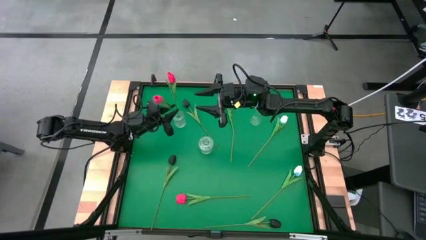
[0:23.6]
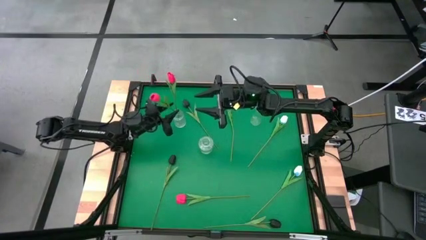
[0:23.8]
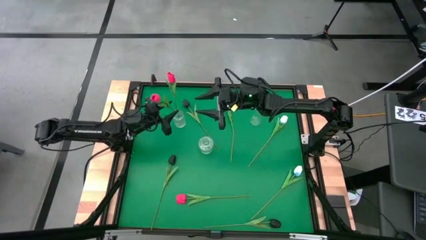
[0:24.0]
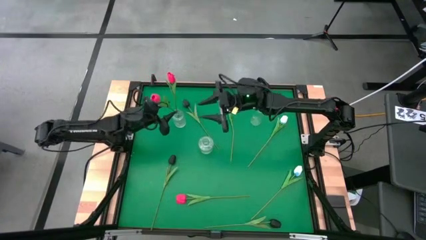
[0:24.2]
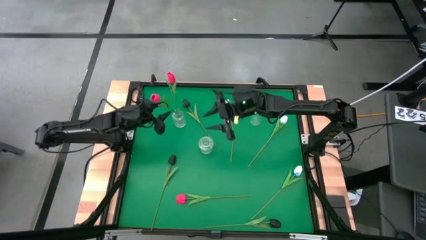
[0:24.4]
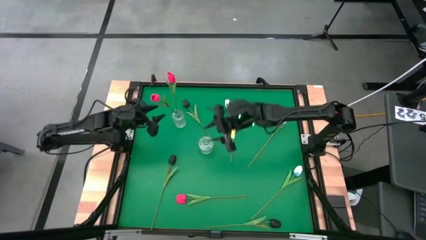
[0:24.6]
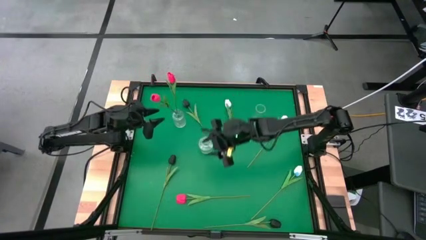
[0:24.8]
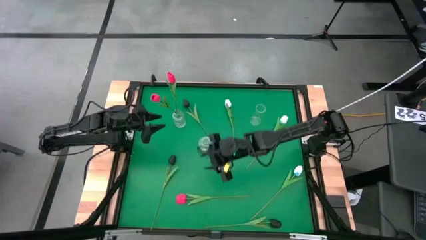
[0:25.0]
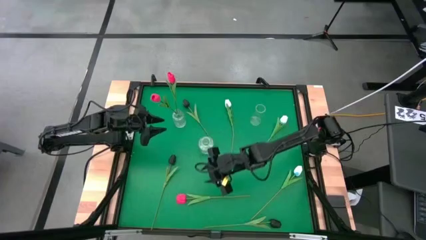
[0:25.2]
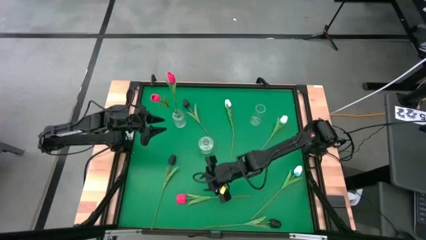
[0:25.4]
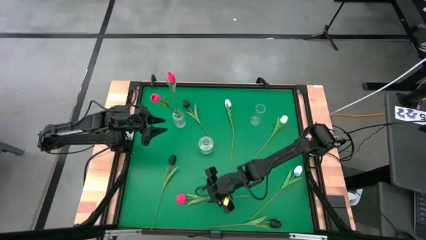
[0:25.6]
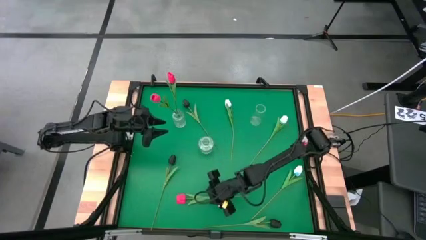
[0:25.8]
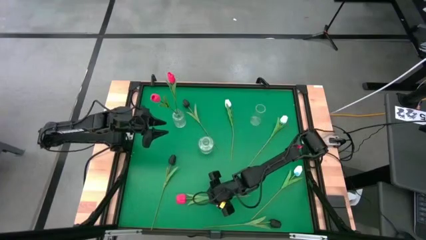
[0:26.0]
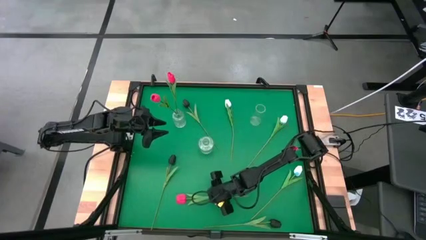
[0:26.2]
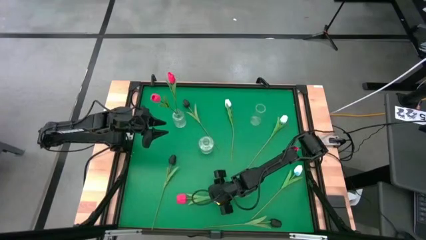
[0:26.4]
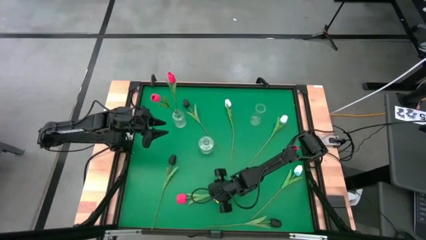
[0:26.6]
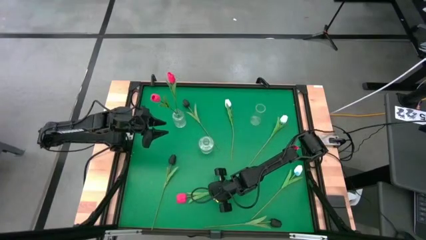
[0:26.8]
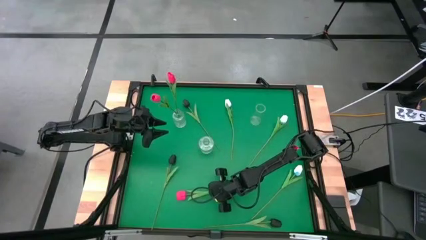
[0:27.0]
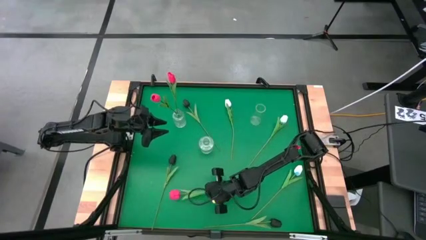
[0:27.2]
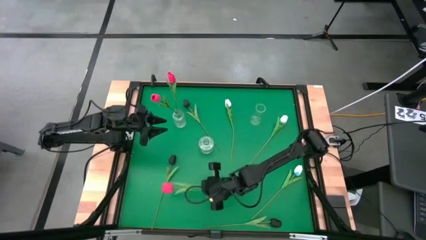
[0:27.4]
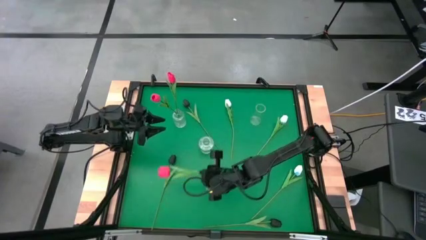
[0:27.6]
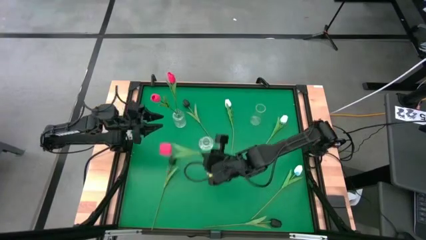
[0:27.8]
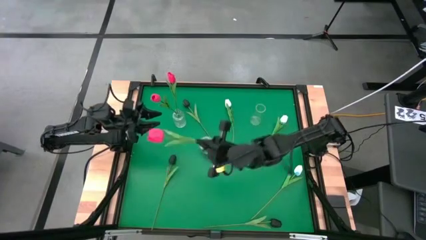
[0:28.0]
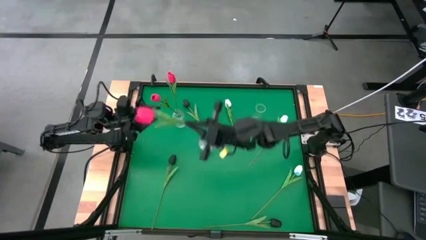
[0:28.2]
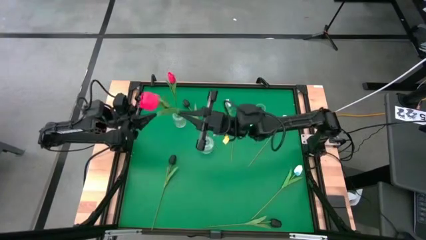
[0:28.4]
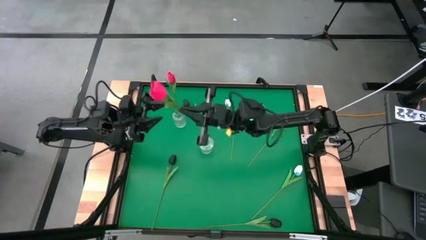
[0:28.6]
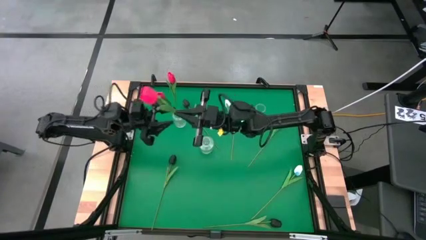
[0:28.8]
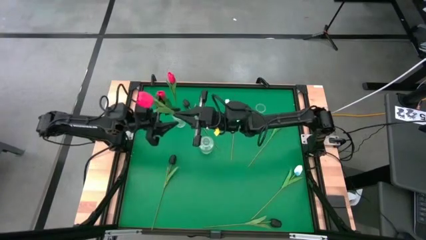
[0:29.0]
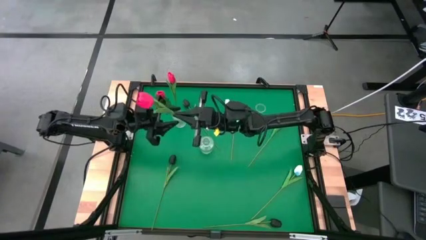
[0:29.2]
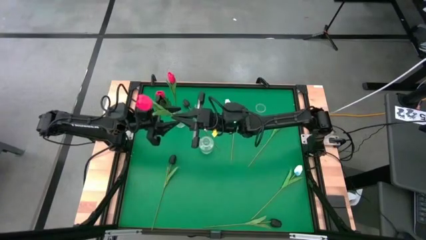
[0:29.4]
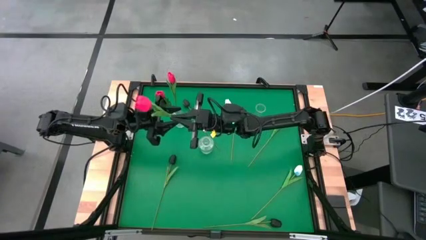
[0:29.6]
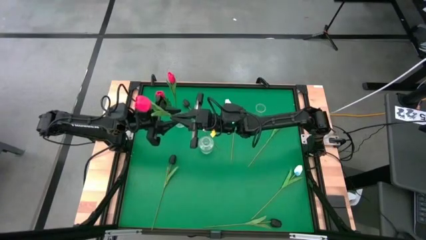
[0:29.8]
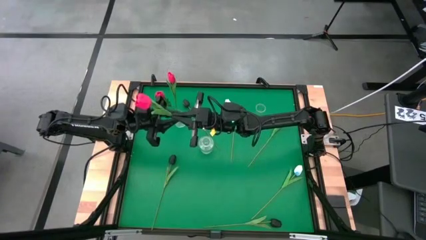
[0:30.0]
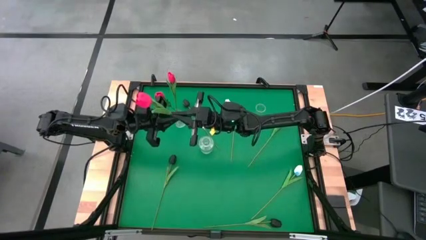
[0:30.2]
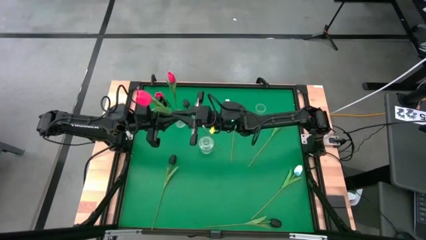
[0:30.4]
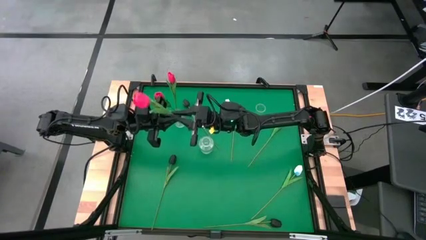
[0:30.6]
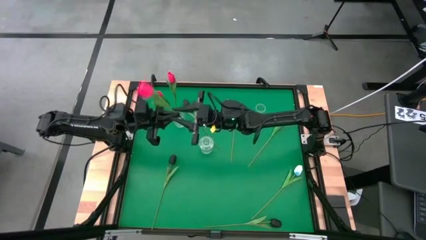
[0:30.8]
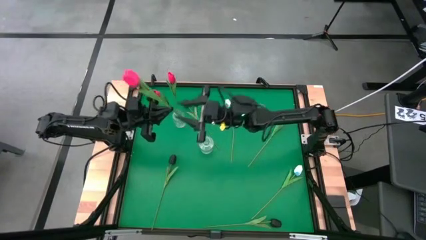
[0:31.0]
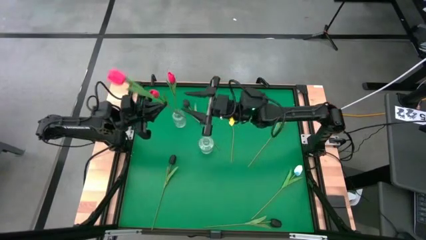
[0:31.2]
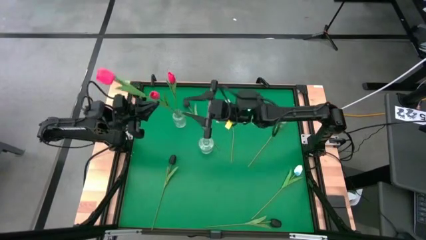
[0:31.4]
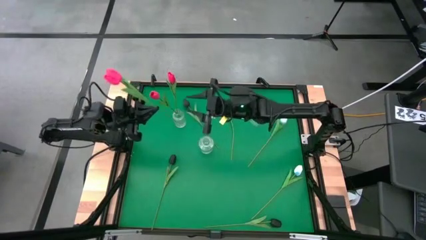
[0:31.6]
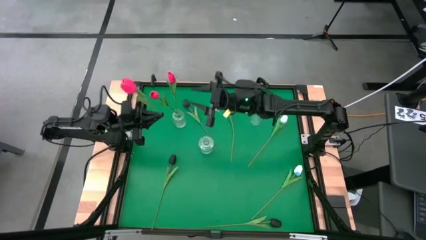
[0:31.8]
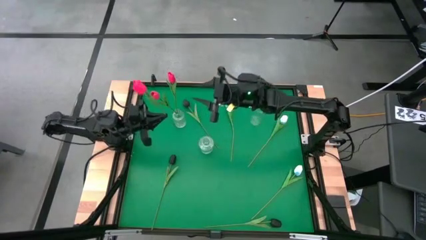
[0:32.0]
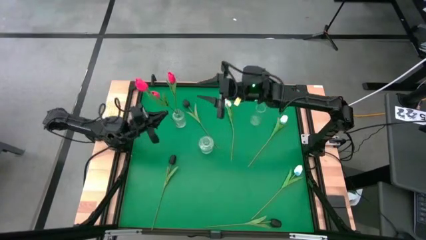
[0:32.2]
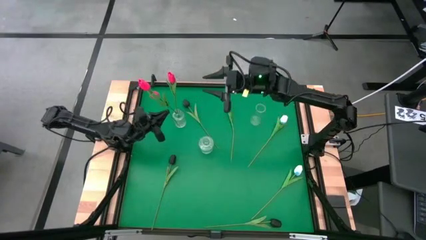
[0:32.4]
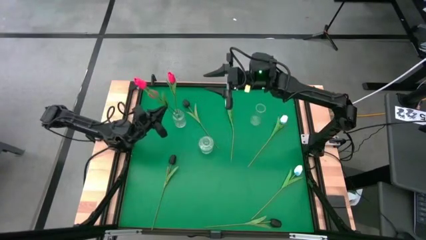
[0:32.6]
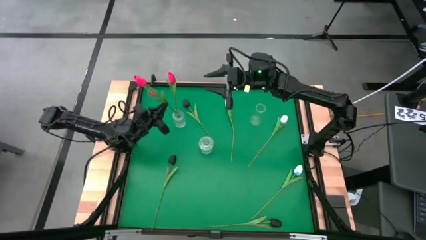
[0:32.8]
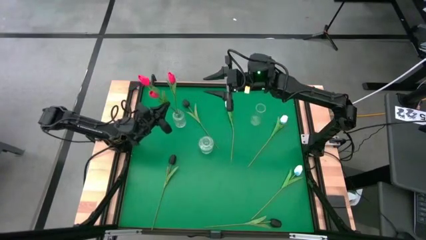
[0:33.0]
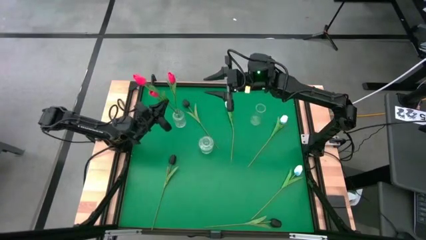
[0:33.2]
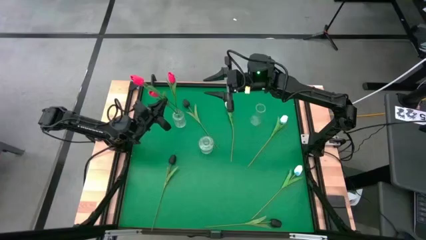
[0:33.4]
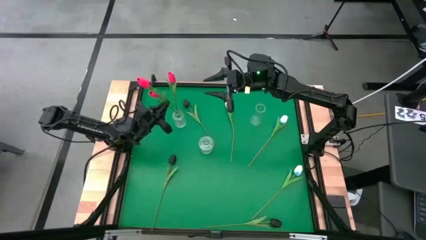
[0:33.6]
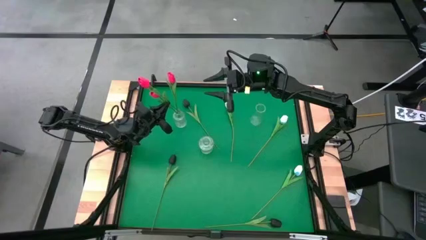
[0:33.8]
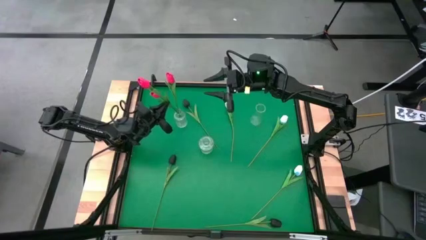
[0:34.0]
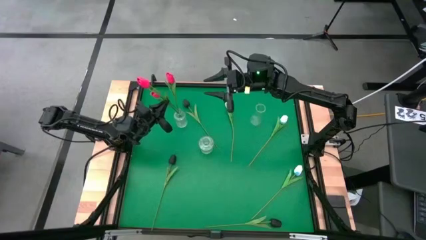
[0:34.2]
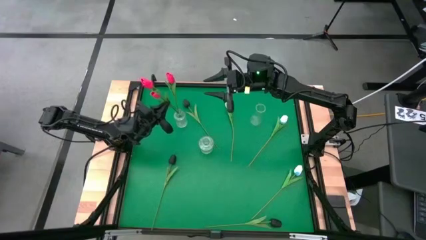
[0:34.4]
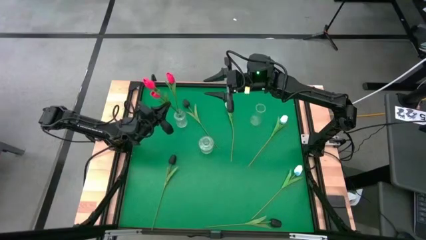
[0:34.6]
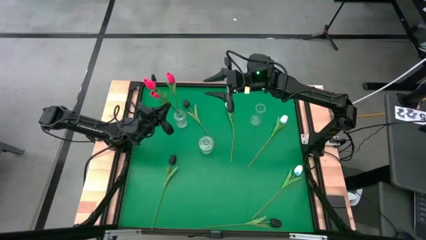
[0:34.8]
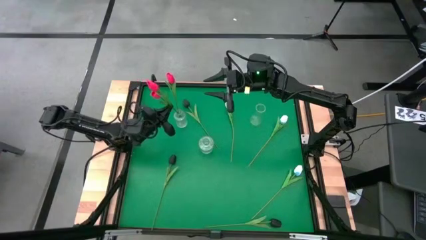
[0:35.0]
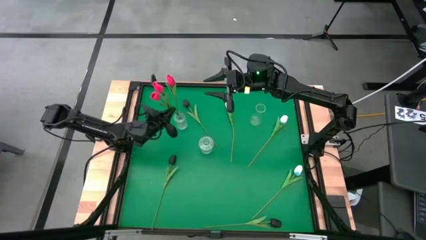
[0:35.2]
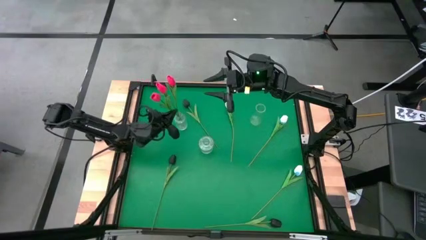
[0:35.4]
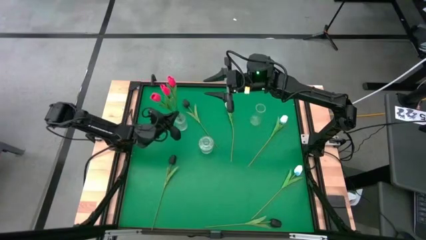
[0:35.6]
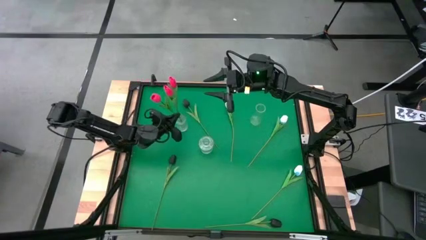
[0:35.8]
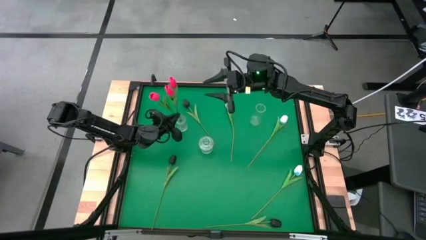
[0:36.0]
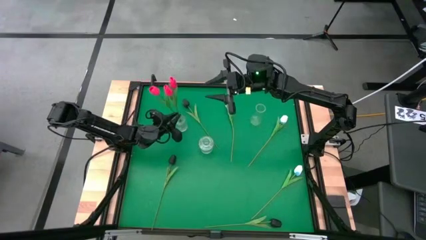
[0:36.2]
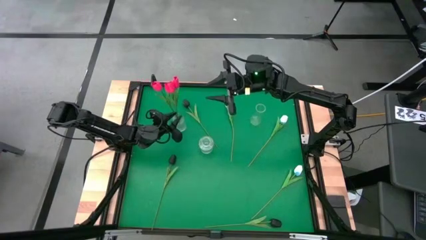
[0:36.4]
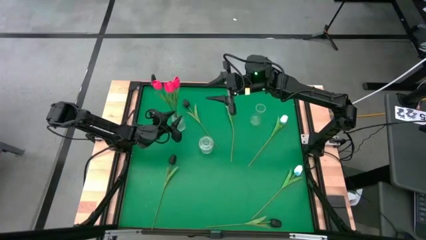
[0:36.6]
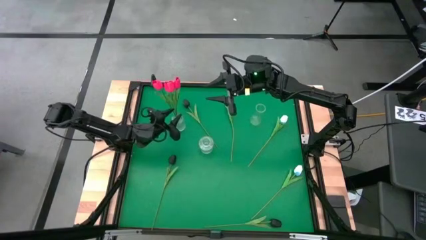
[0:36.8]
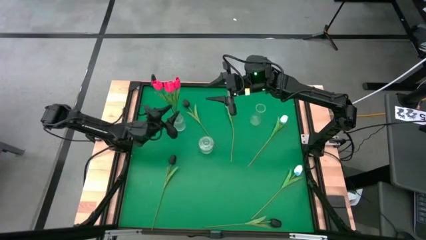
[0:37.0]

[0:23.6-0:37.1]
Task: Sort flowers into vase by color
Put the pink tulip into the top left transparent vase
